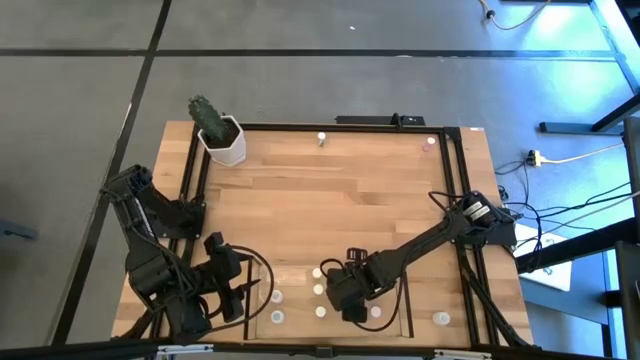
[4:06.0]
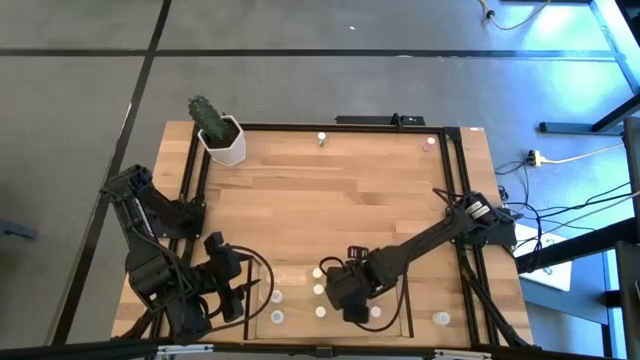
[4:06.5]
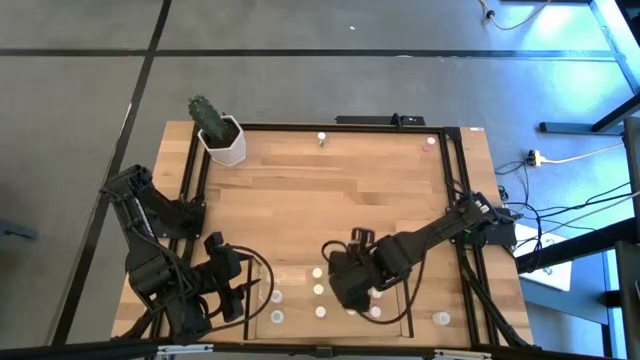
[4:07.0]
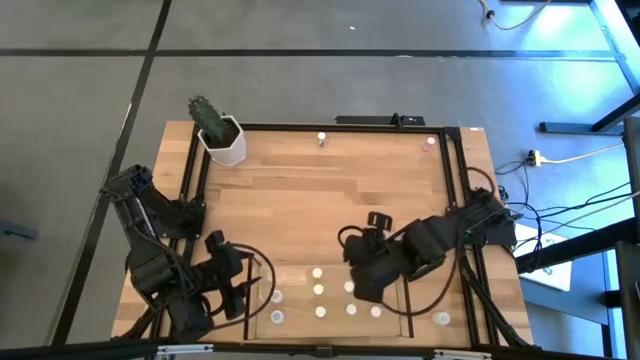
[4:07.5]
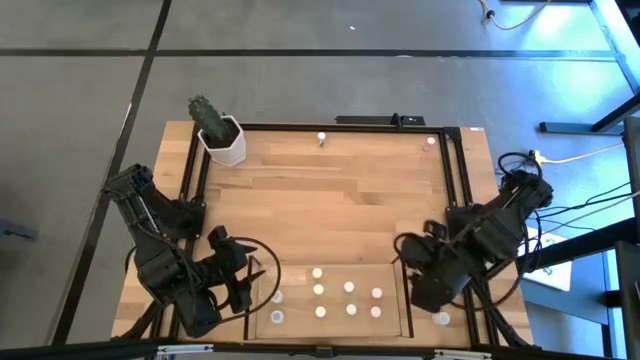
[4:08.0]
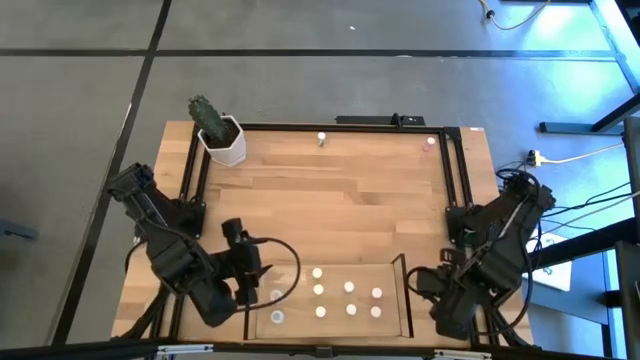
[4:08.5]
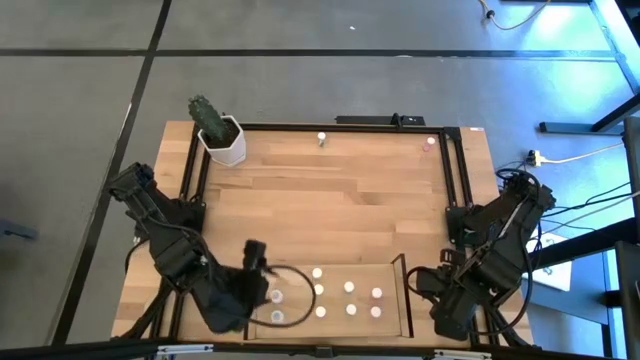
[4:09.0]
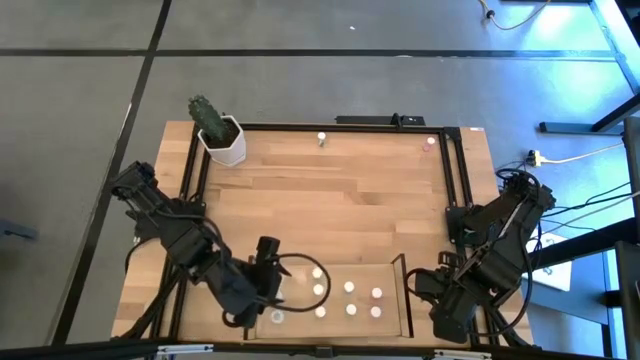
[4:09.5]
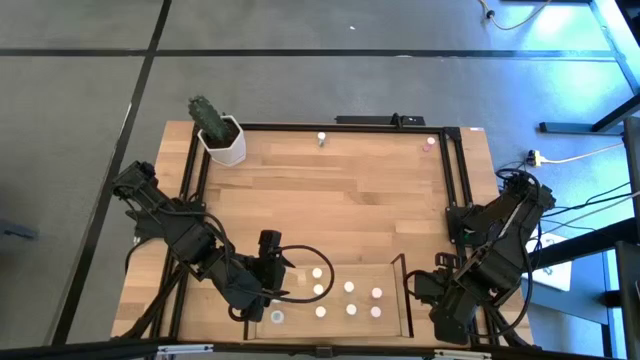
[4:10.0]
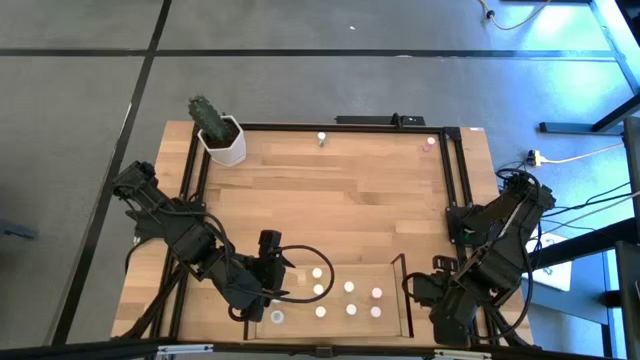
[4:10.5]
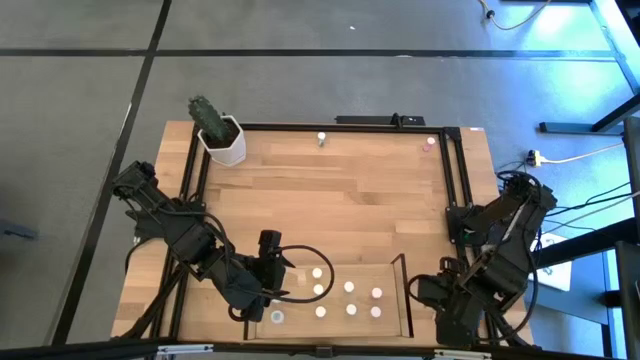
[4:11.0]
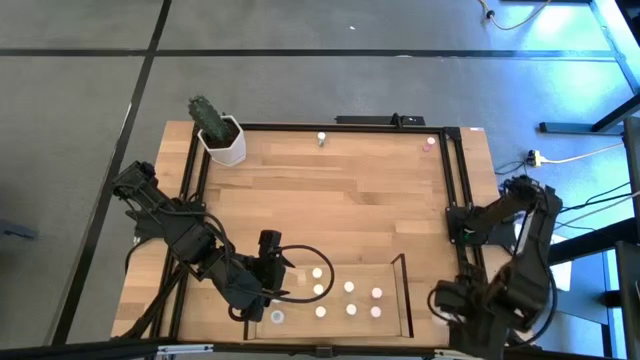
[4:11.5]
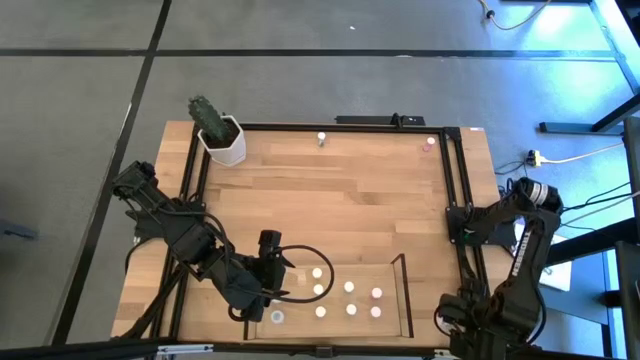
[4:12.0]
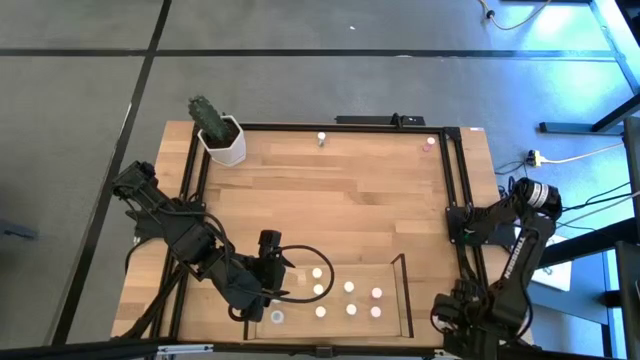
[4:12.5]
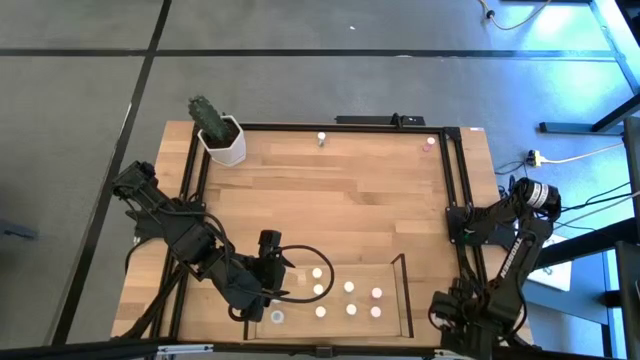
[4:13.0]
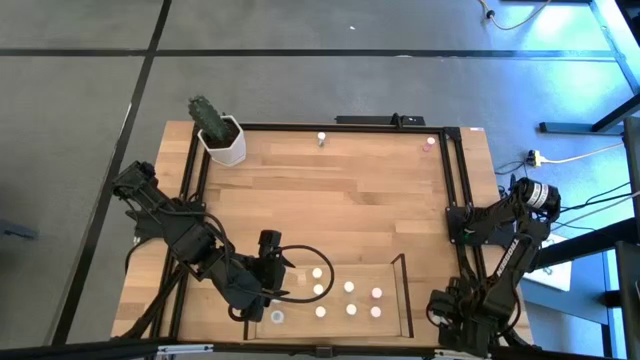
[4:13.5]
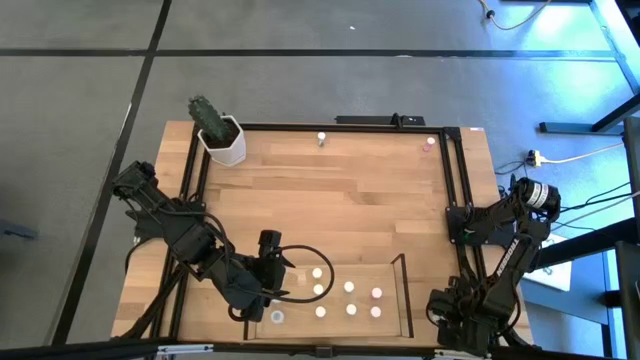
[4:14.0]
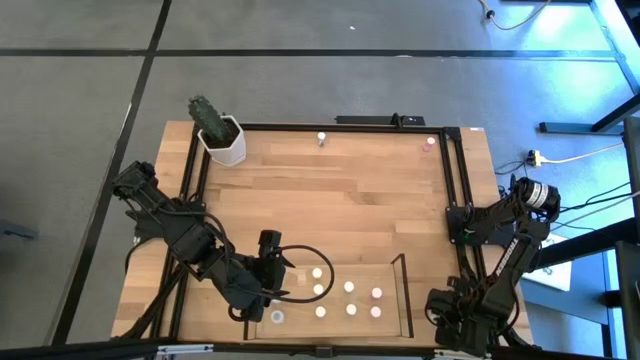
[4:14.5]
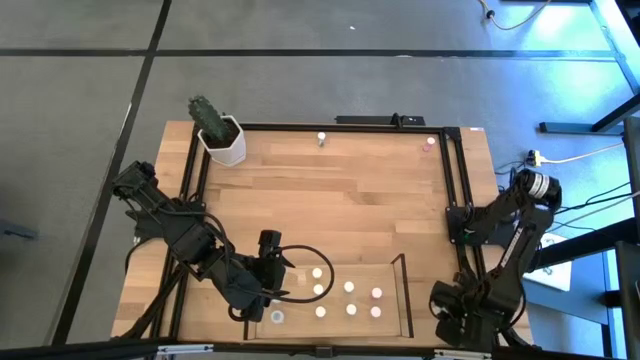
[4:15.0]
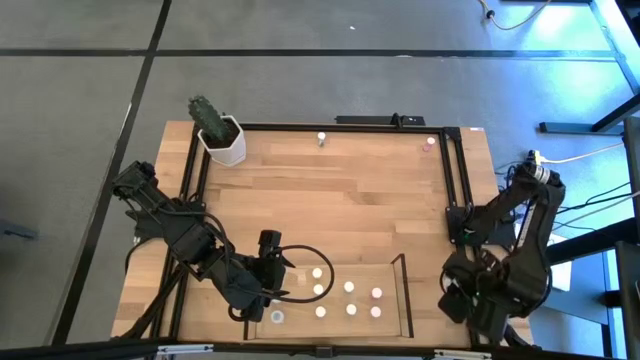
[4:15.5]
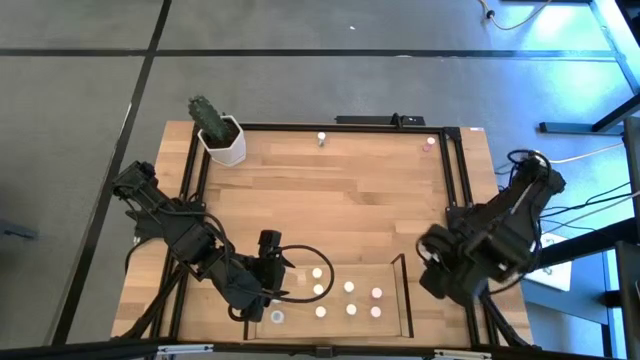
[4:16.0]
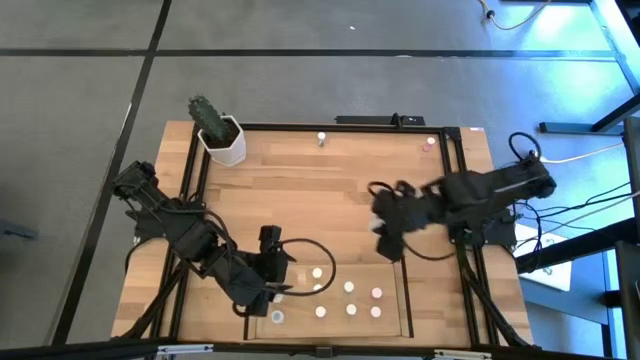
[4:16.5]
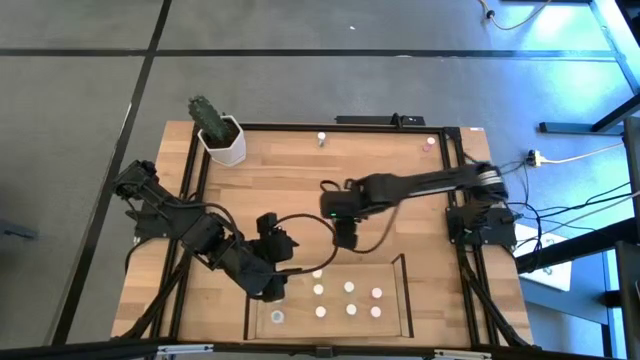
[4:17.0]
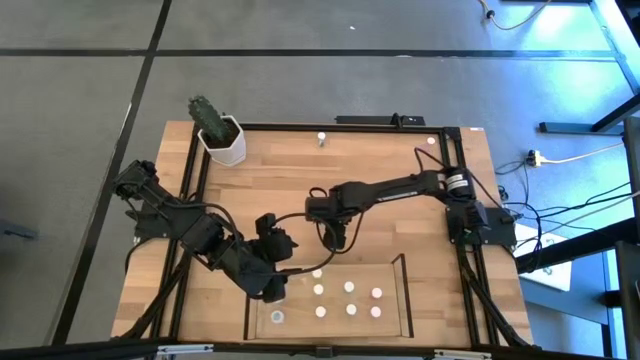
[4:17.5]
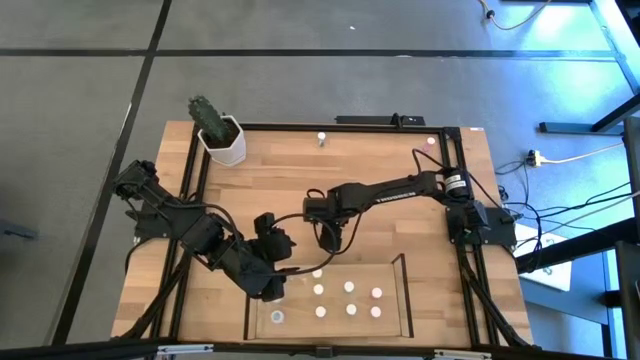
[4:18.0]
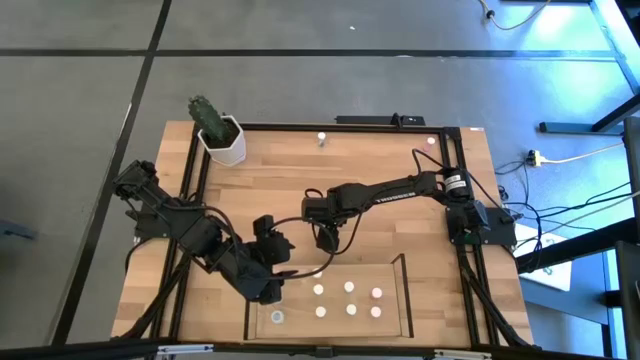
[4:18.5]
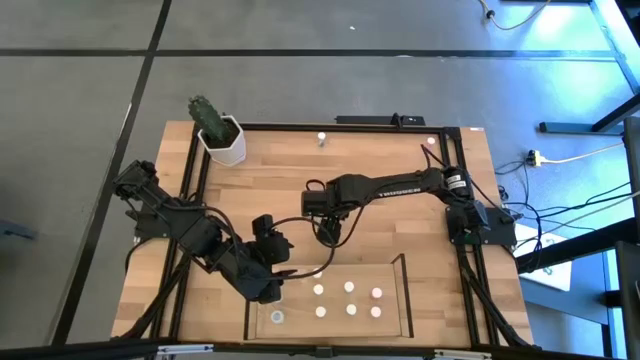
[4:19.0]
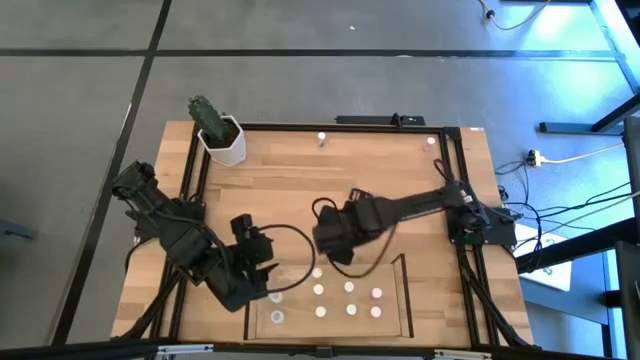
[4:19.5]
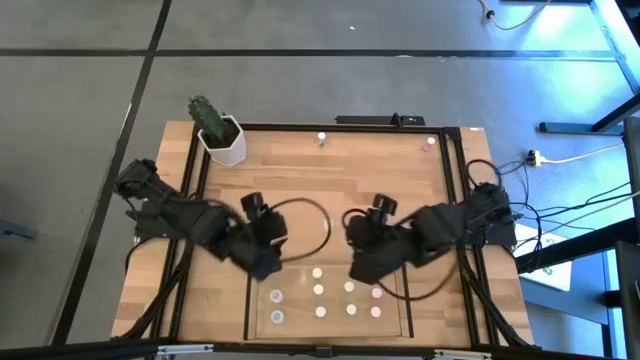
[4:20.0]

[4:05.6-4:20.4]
Task: Pick and place medicine bottles onto shelf by color
Put the white pill bottle on the shelf aligned with the other white pill bottle

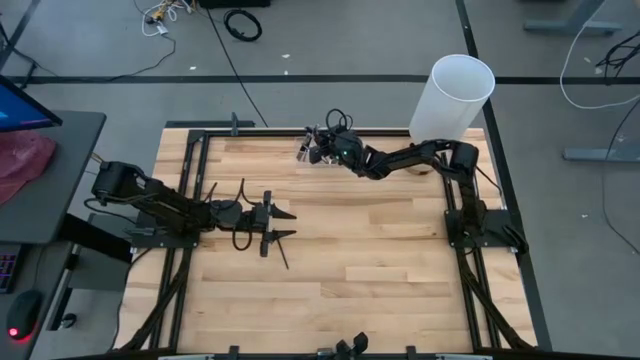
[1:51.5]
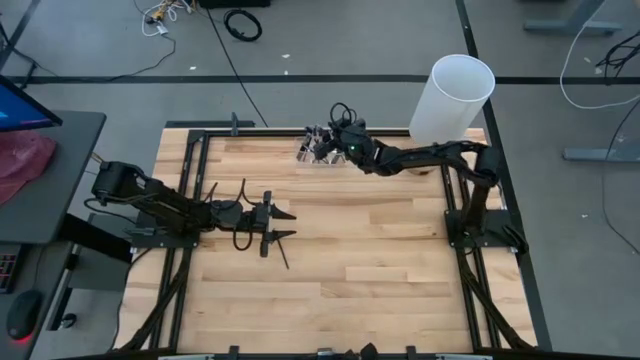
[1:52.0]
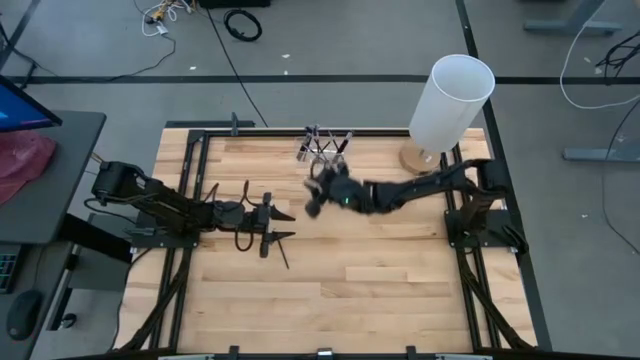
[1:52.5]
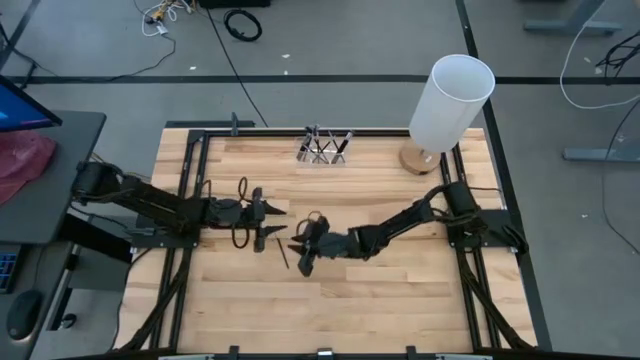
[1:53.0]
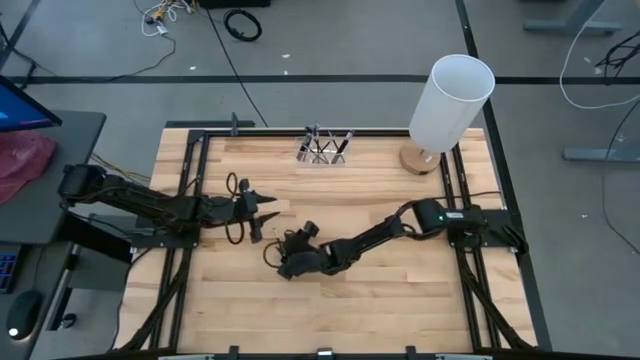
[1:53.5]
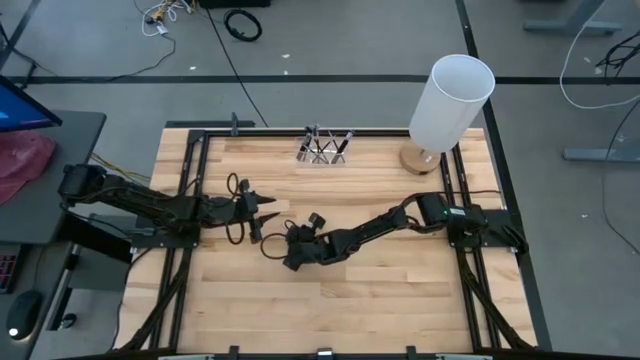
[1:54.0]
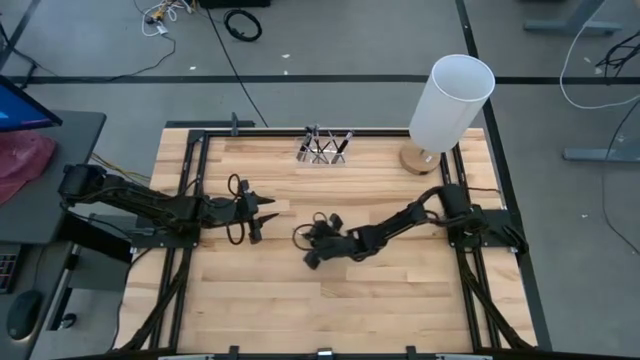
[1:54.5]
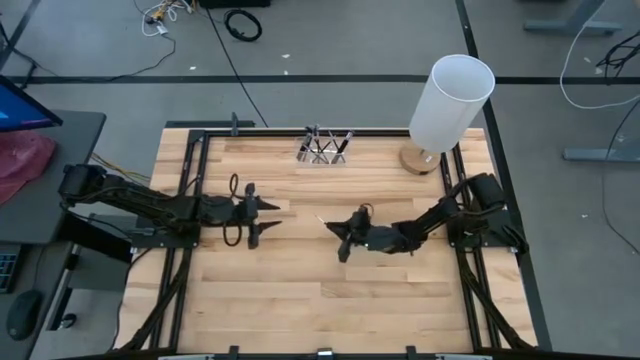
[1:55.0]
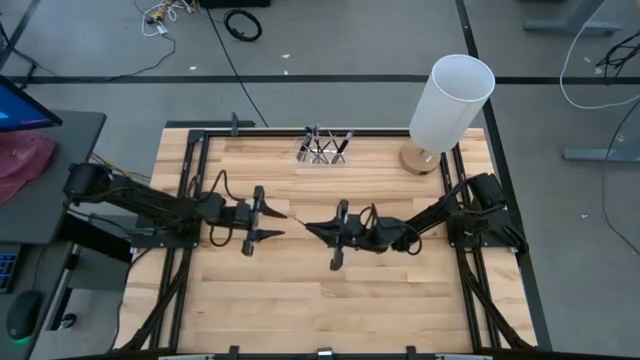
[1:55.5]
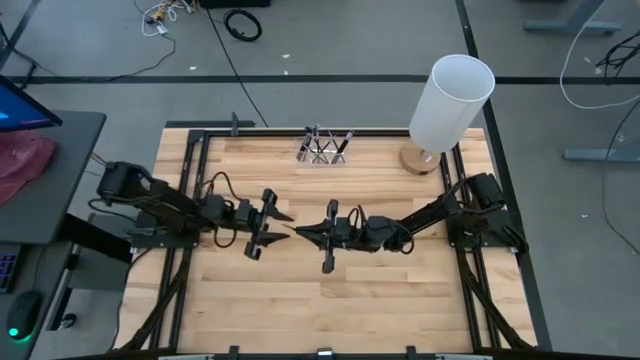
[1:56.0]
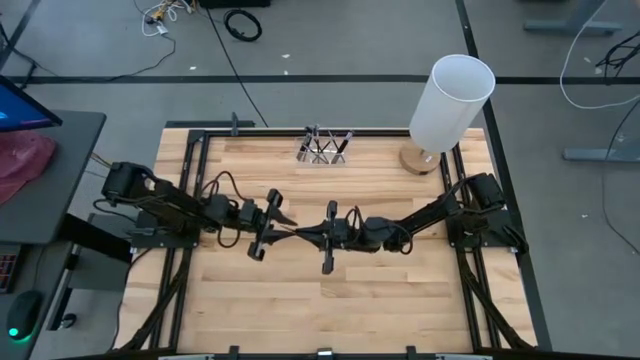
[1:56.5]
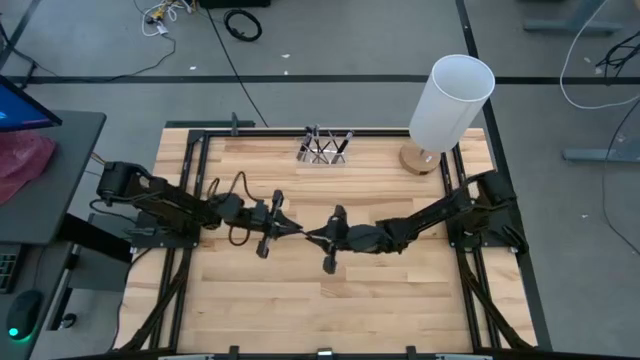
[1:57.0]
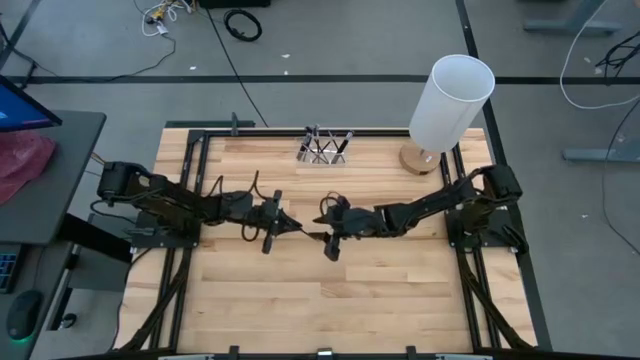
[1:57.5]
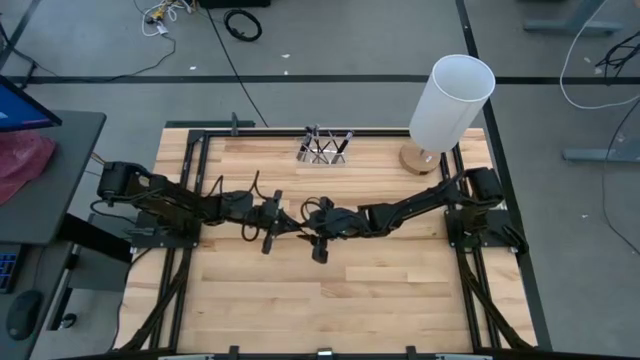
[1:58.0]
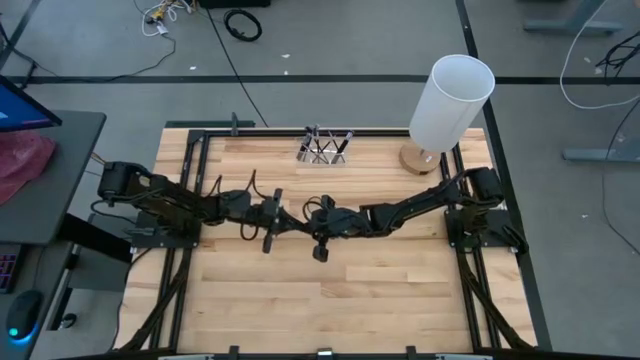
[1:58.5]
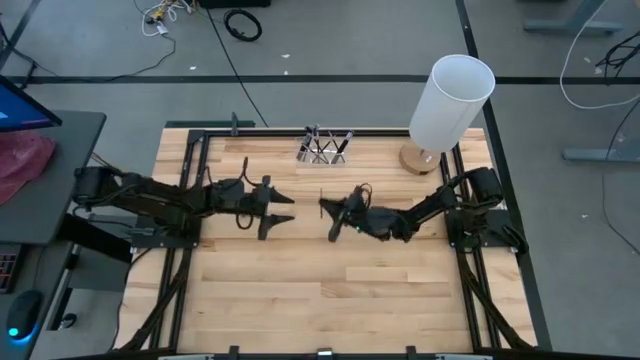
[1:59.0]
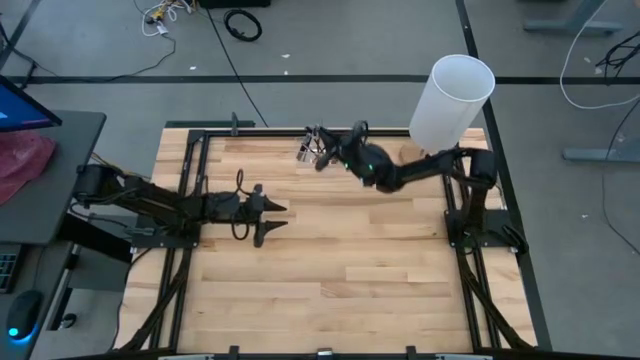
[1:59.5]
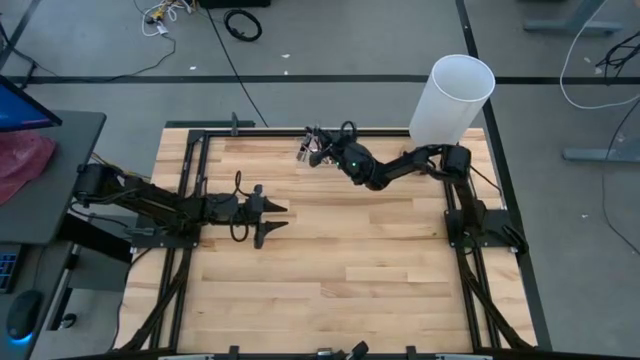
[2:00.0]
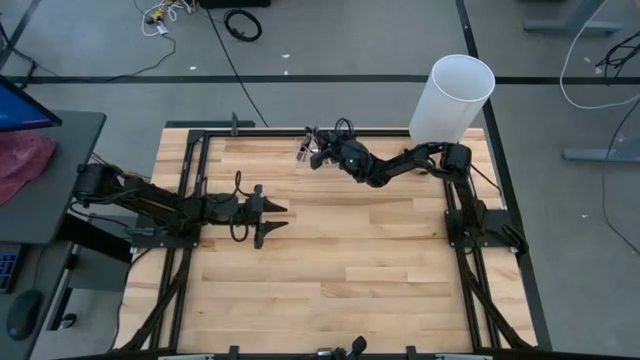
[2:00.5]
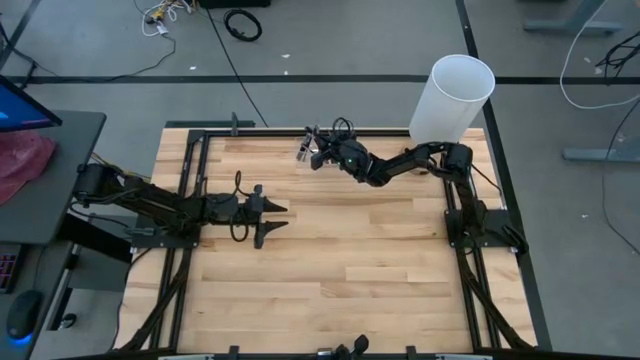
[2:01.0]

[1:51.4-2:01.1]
Task: Pick & Place Makeup Supplies
Put the black makeup brush into the transparent organizer
